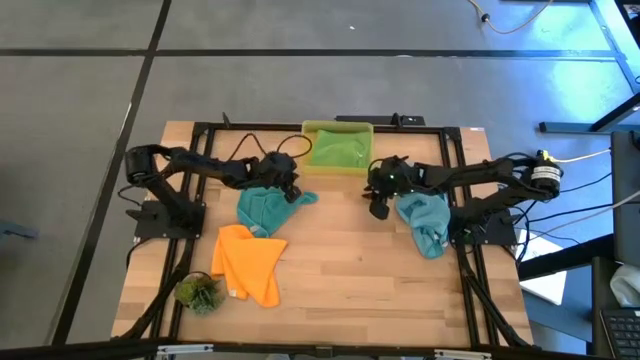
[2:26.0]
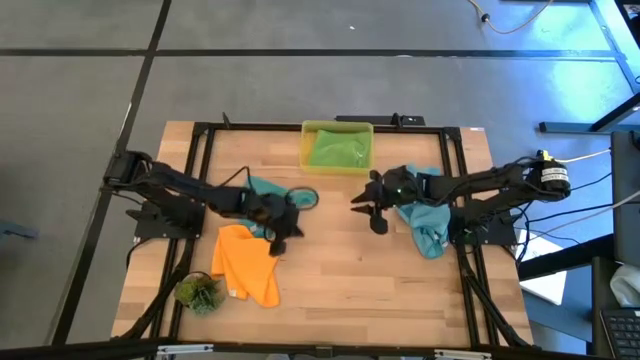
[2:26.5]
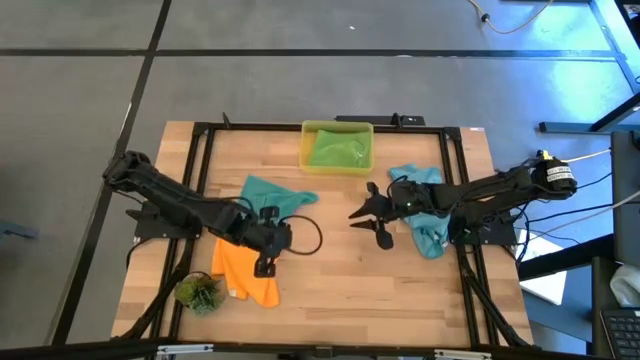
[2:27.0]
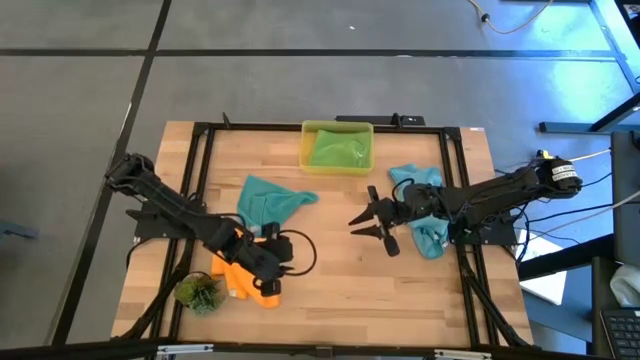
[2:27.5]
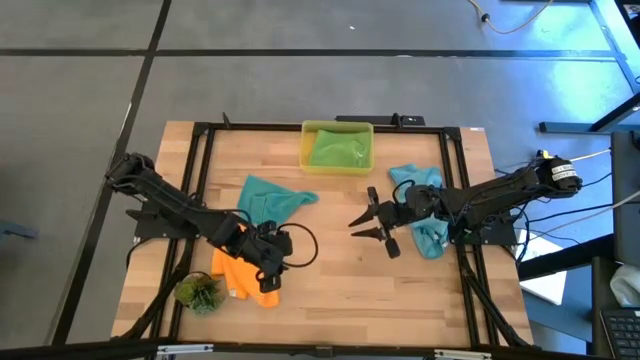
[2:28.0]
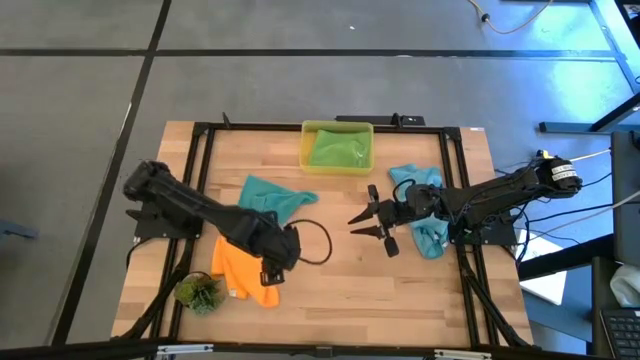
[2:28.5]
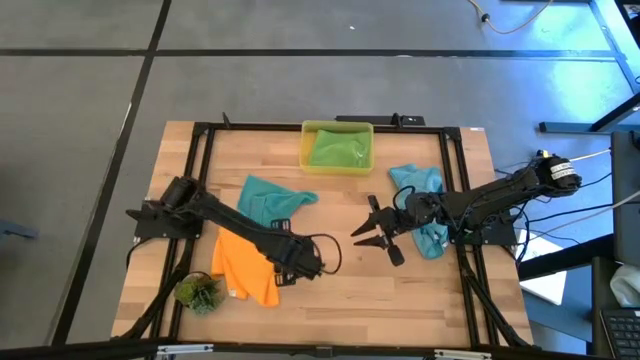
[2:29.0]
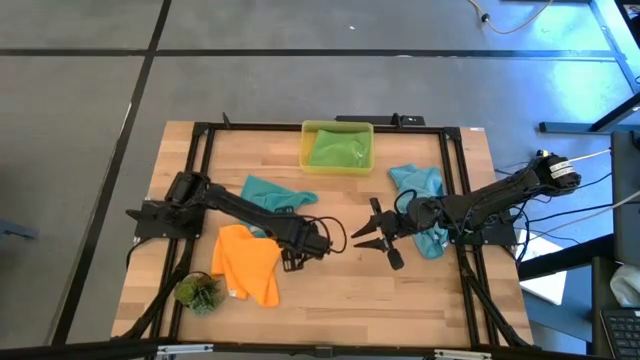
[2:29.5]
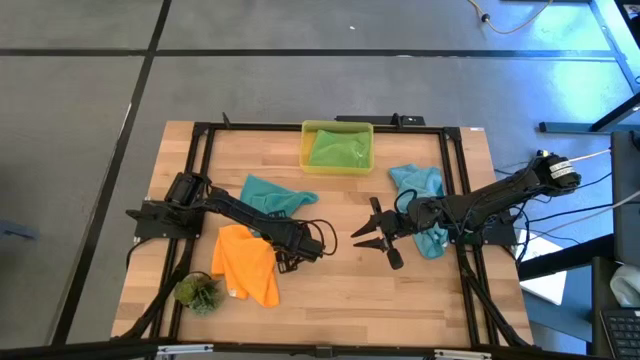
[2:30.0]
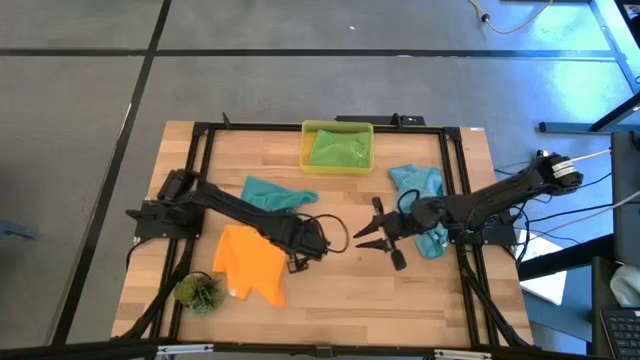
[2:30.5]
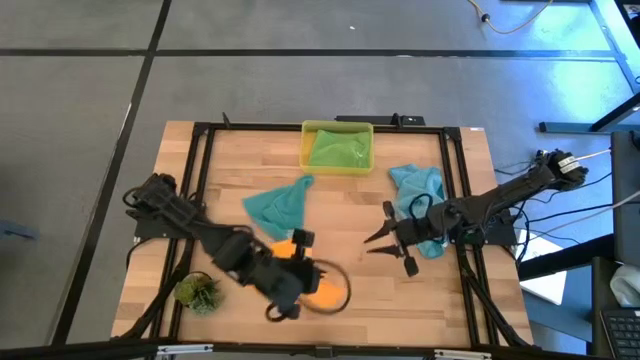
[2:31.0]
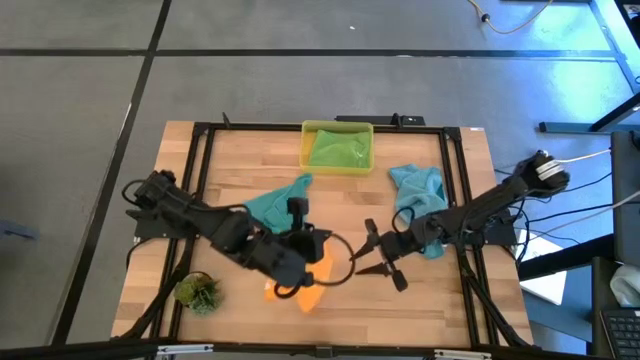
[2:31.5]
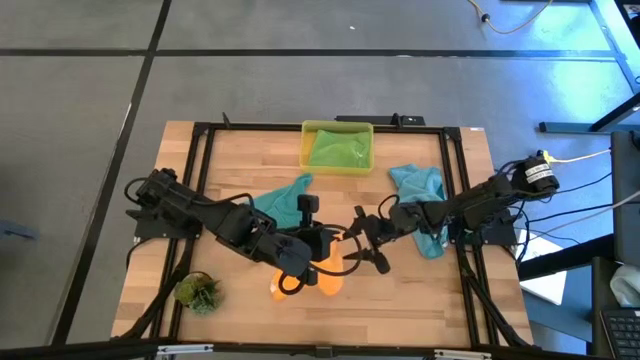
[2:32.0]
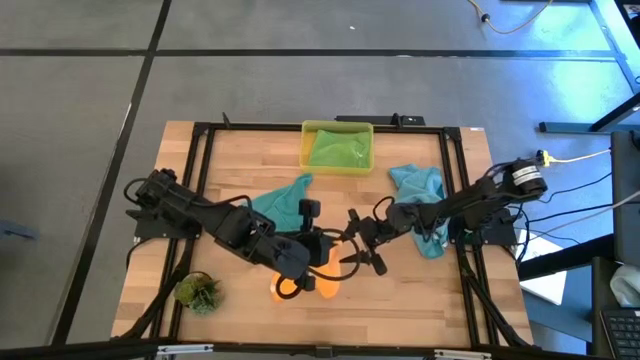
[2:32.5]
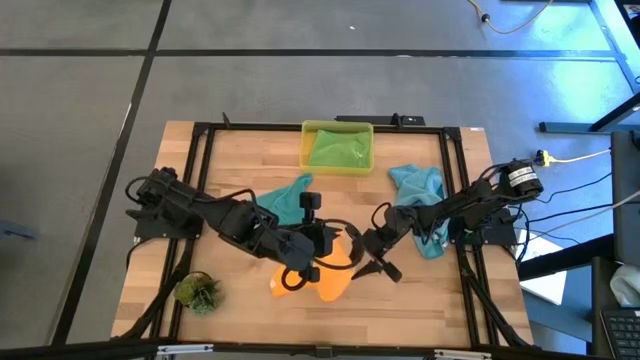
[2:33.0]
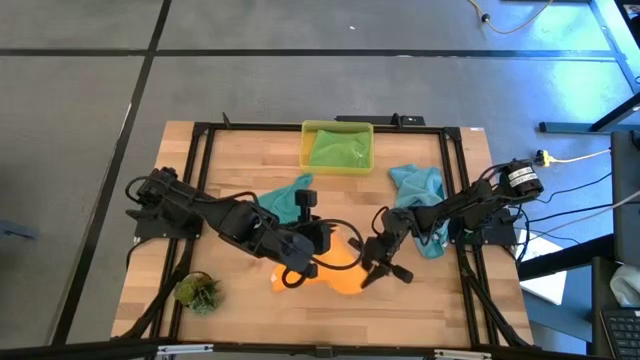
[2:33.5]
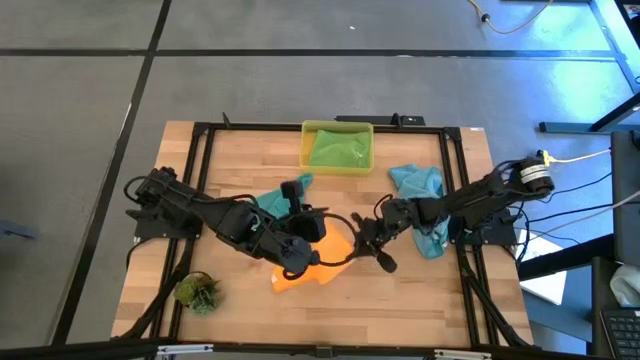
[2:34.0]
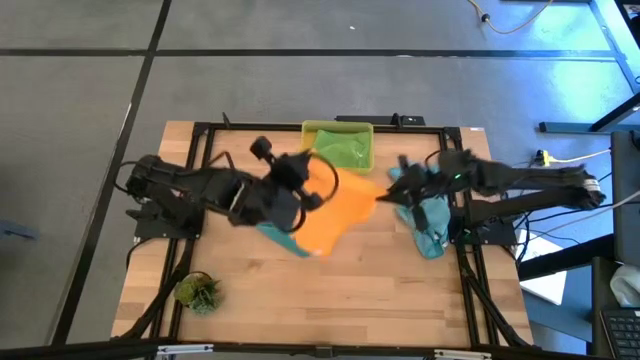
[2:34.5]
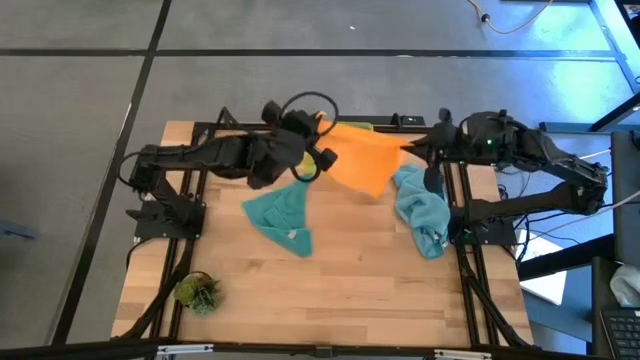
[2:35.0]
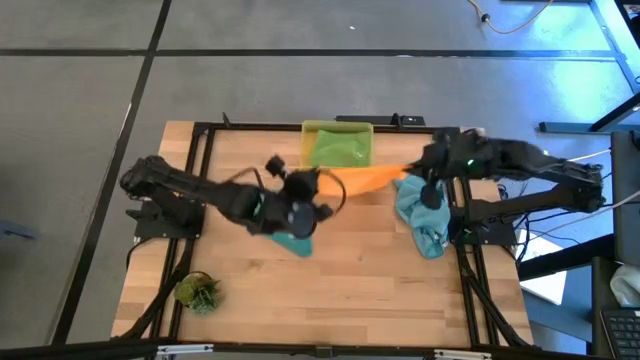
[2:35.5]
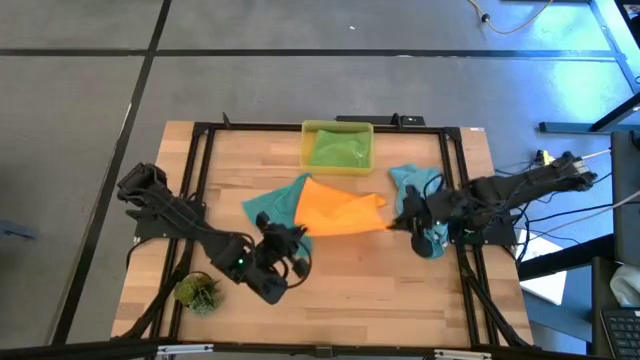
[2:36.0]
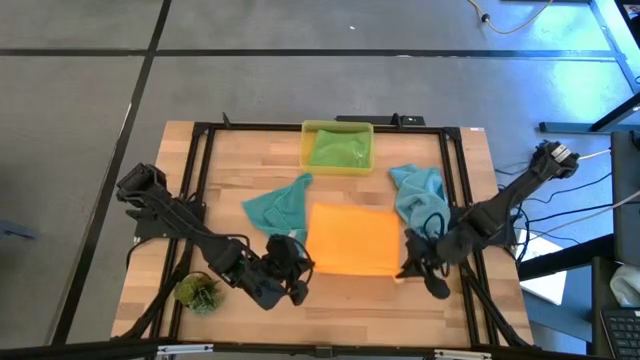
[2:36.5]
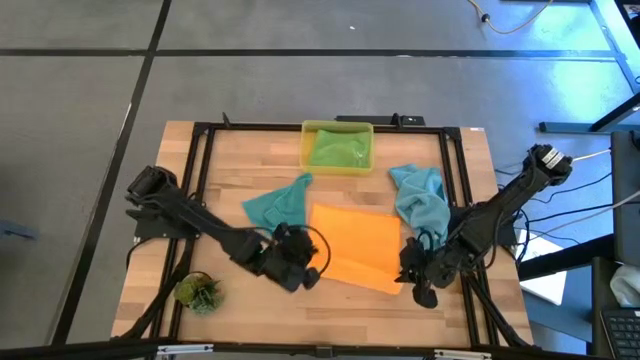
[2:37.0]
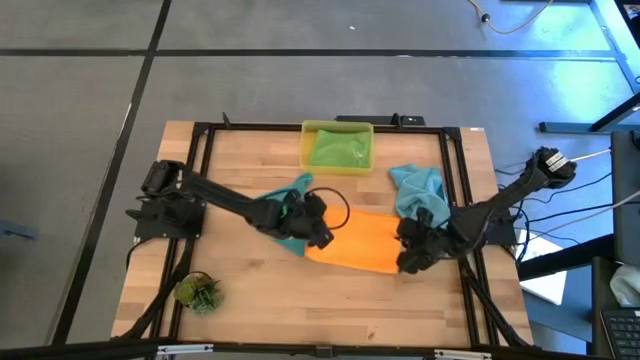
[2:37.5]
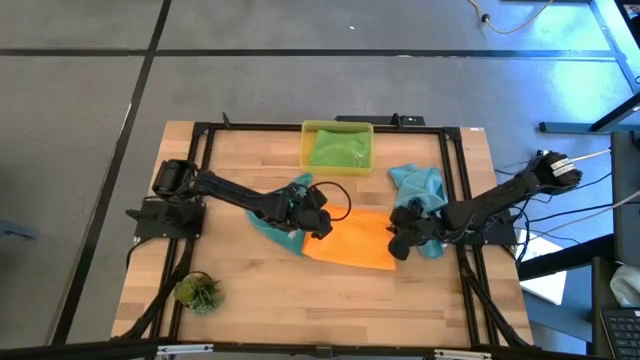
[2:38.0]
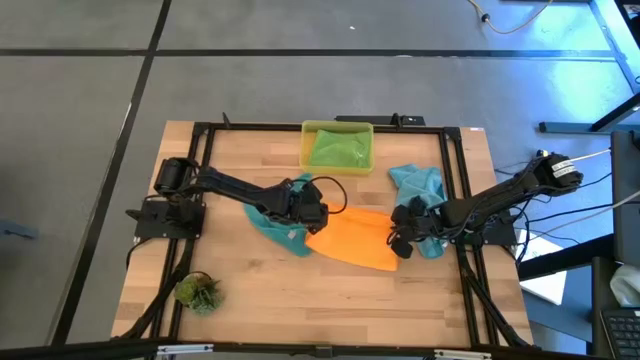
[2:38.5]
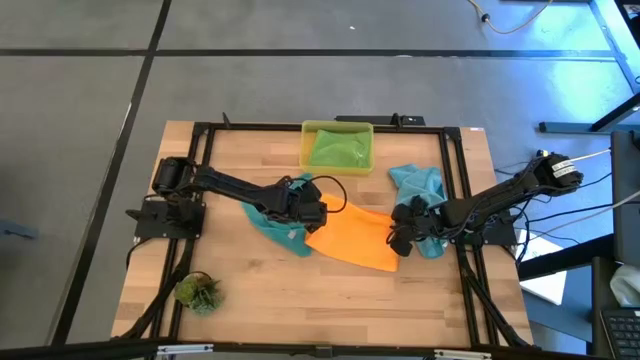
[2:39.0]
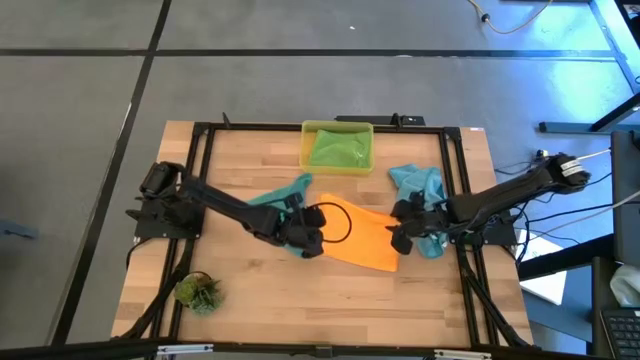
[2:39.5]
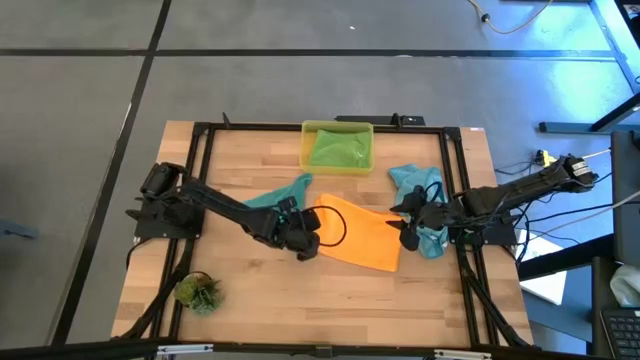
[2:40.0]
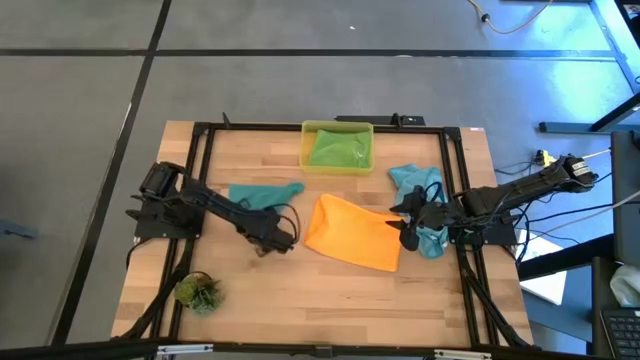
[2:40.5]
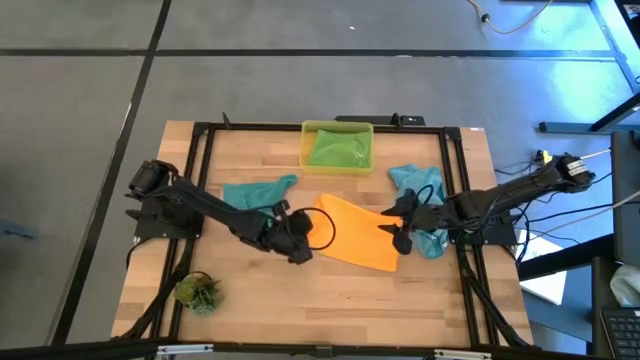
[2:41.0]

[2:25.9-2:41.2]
Task: Fold microfiber towels
Fold the orange microfiber cloth

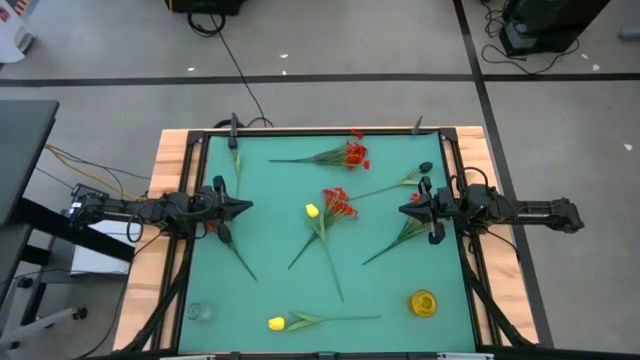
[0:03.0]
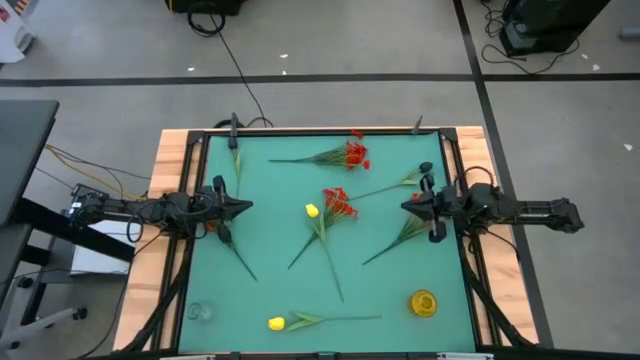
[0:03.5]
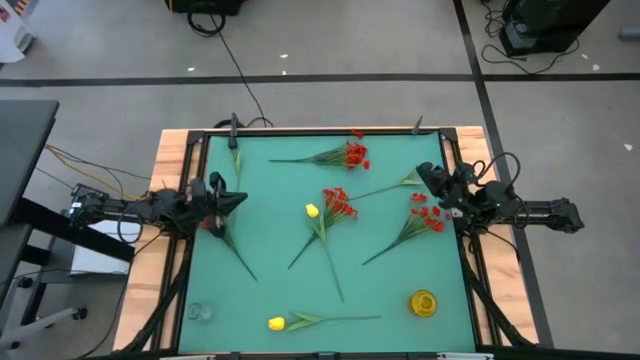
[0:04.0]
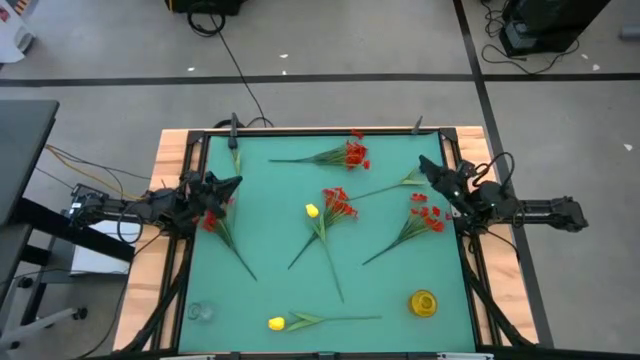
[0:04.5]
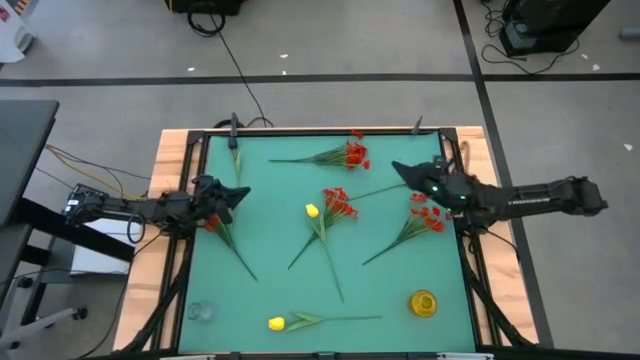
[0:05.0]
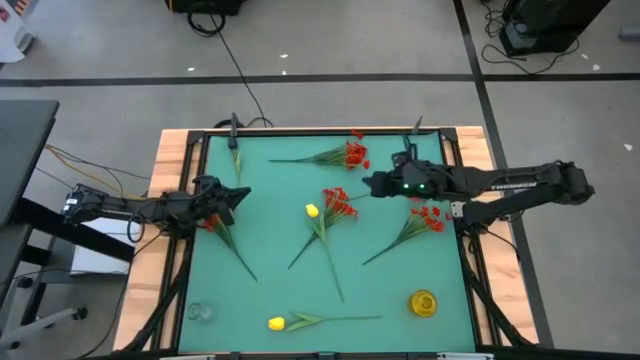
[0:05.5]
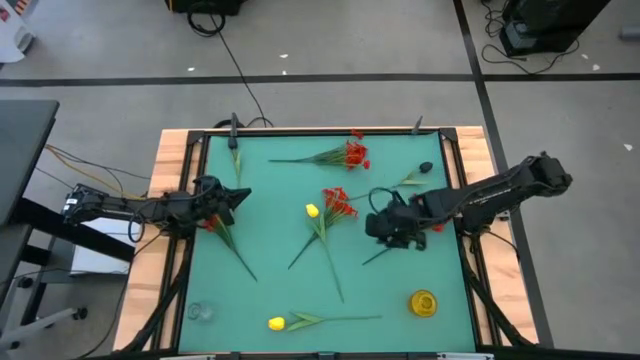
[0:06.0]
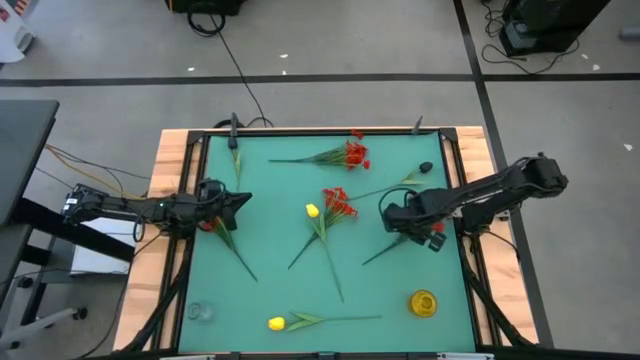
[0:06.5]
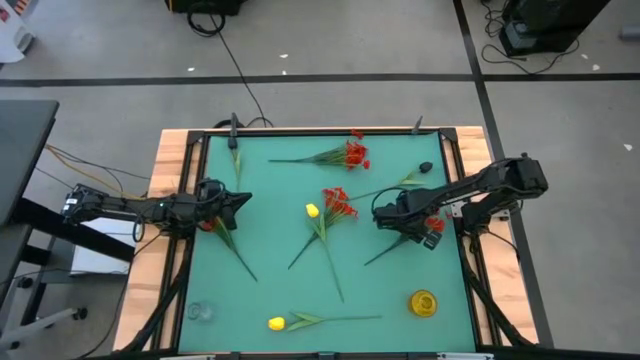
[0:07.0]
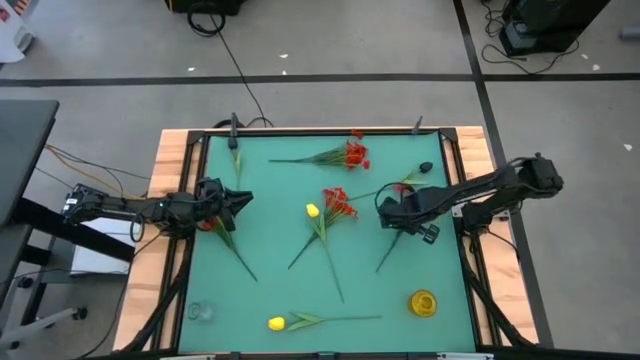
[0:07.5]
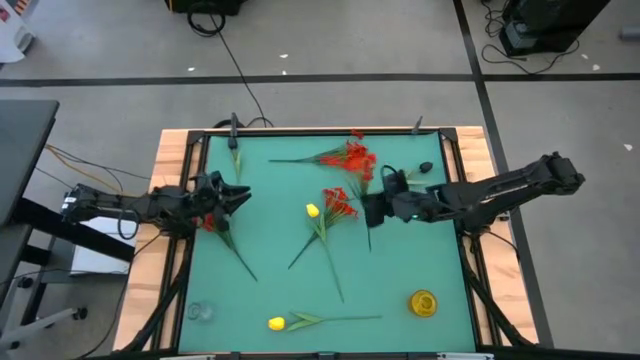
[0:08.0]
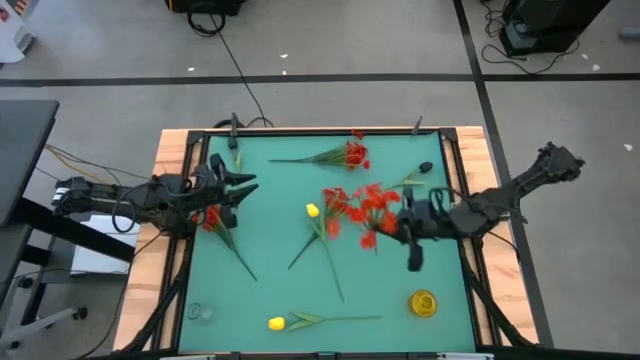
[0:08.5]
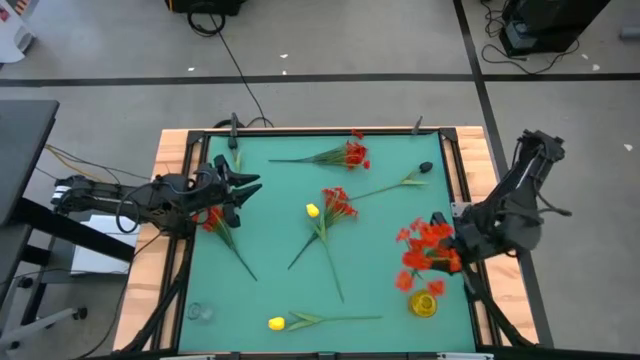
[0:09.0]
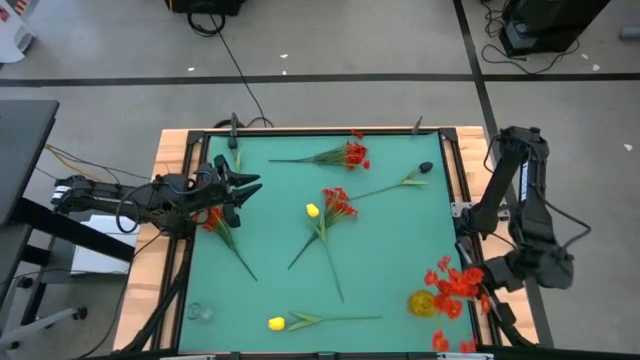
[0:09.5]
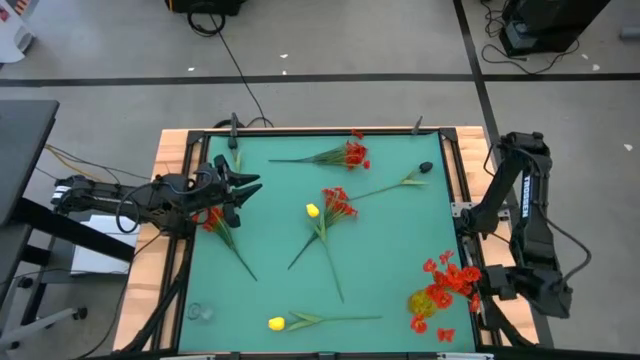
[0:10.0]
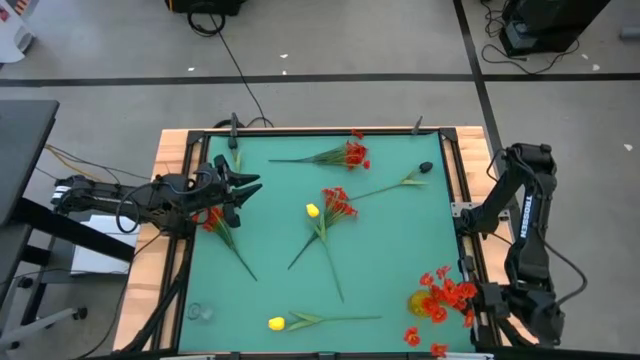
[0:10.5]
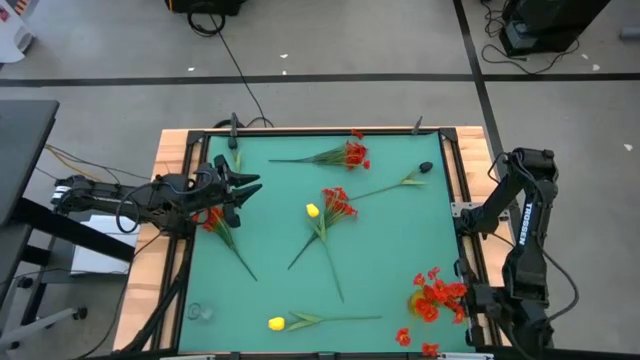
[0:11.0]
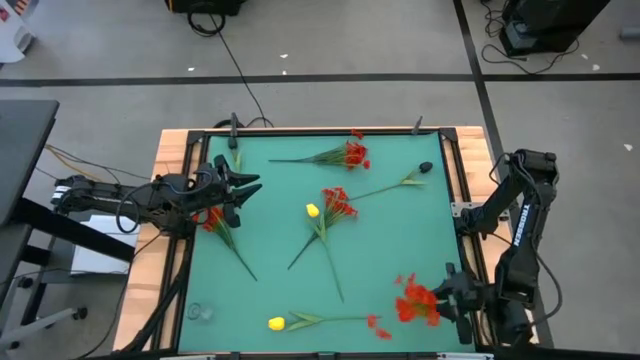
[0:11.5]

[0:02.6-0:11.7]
Task: Sort flowers into vase by color
Put the bottom right red flowers into the yellow flower vase
